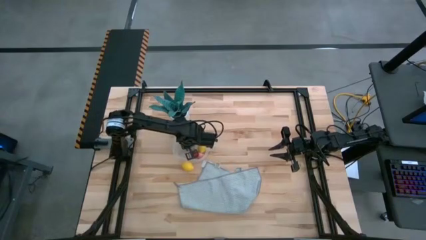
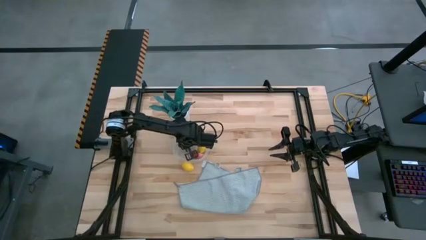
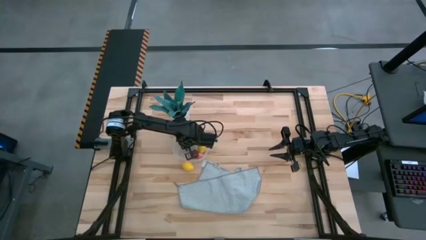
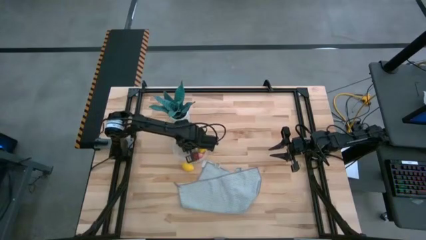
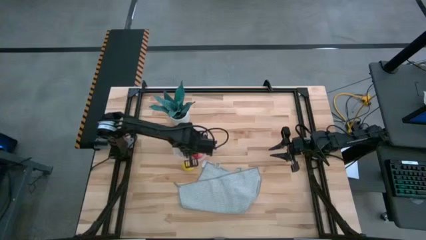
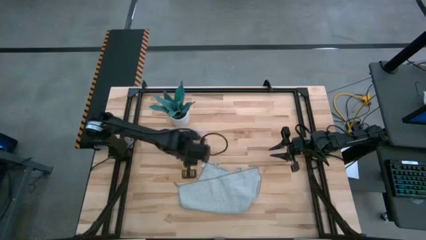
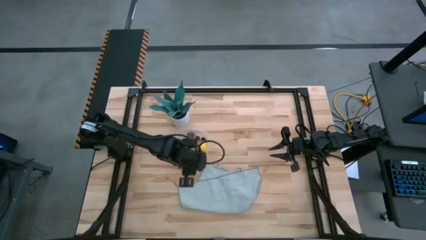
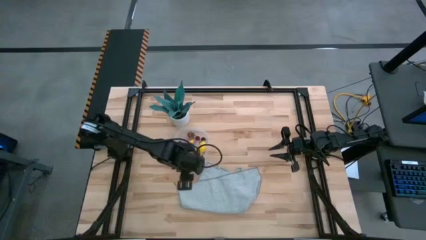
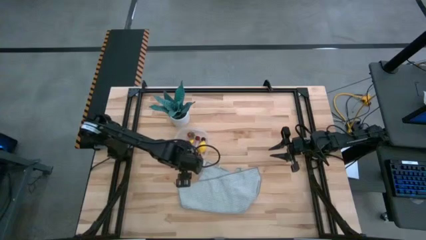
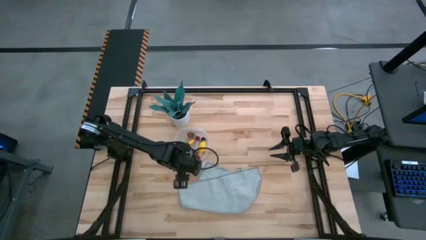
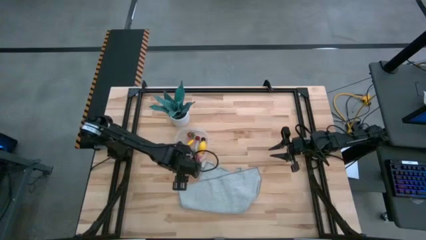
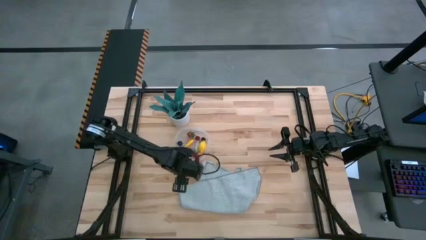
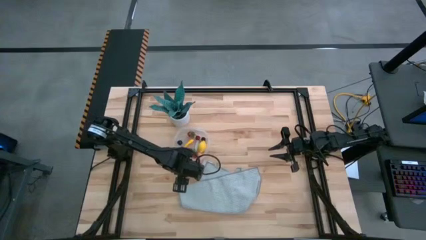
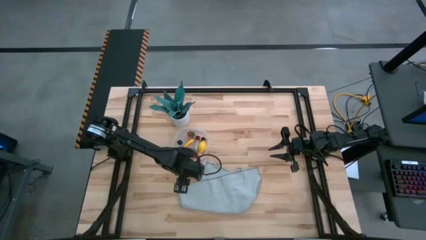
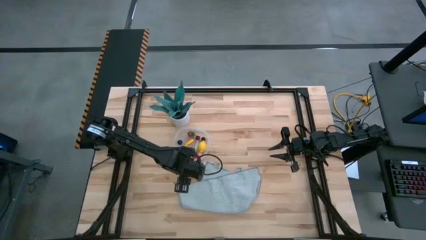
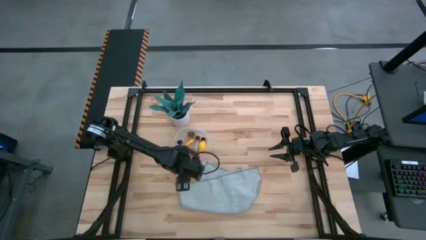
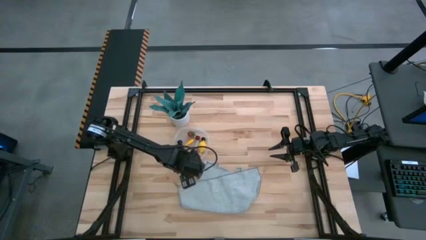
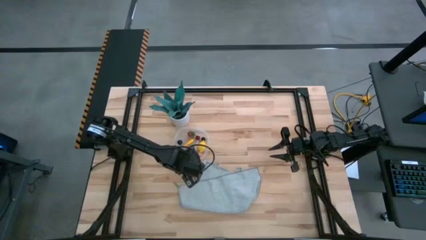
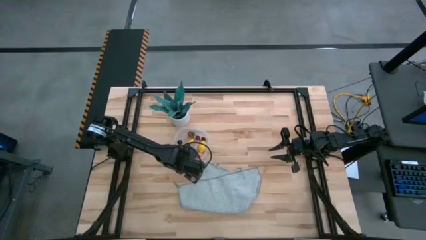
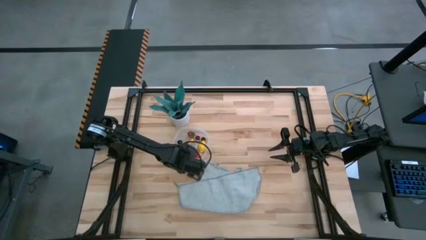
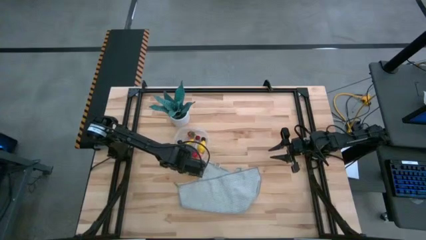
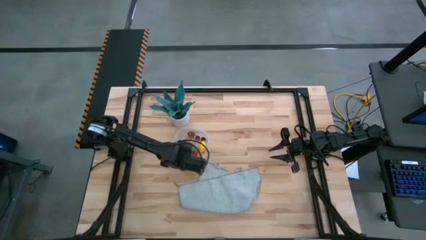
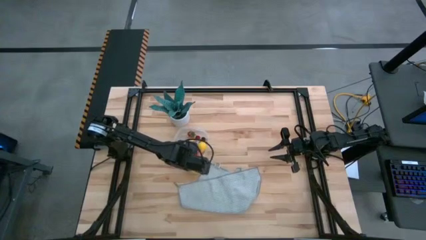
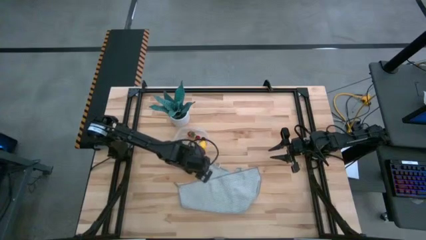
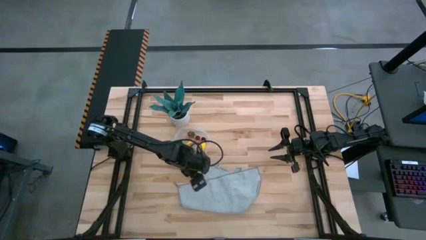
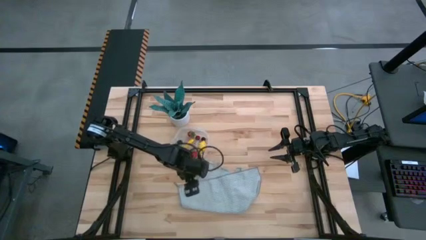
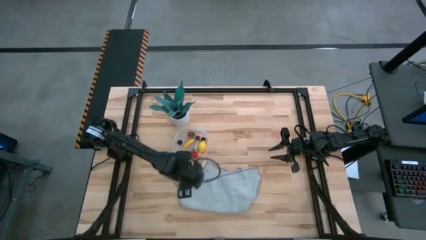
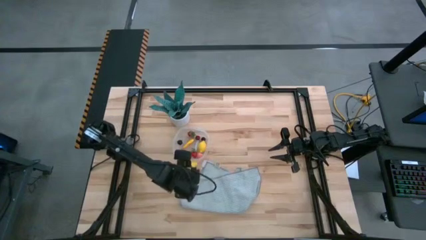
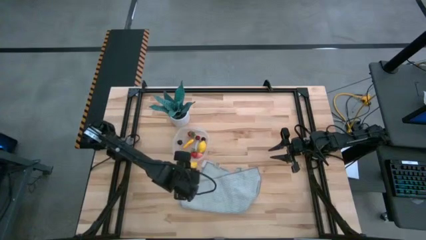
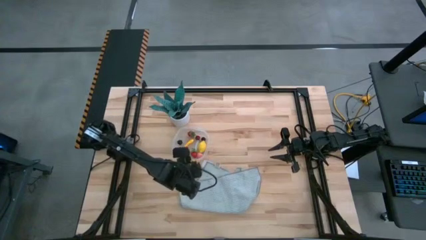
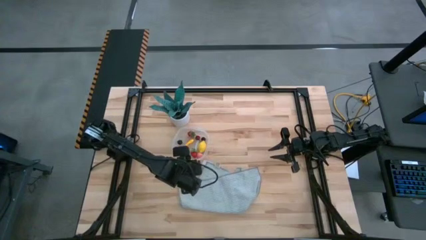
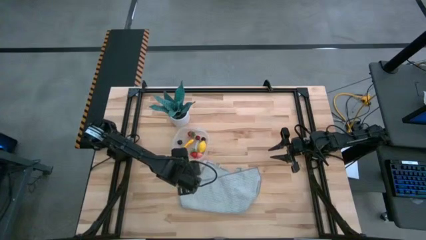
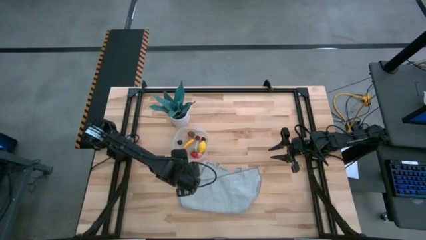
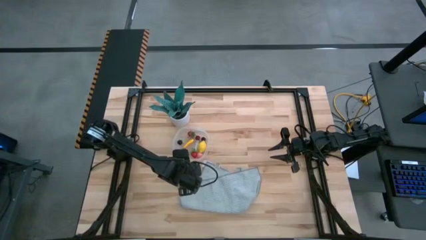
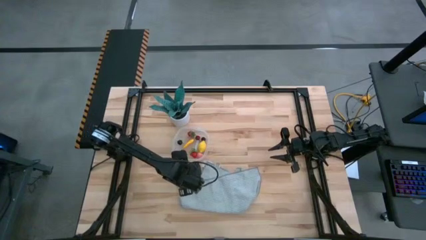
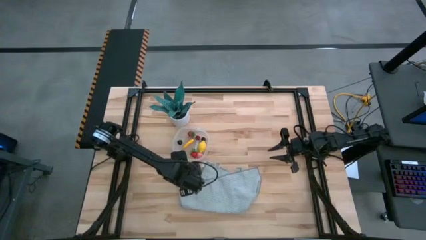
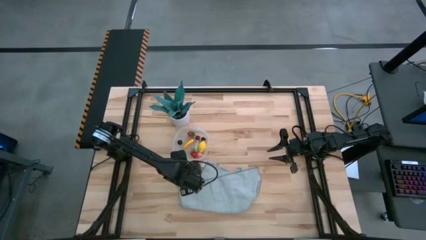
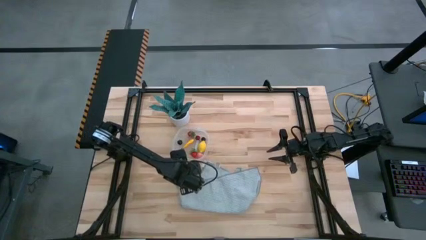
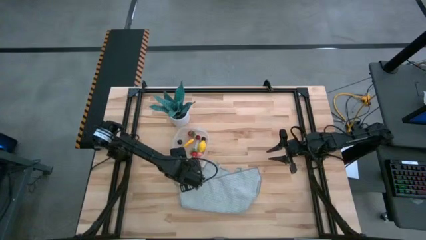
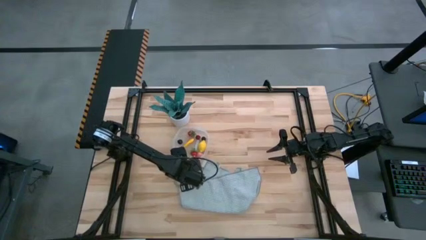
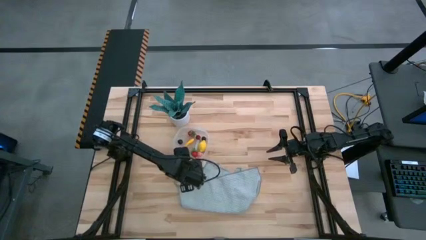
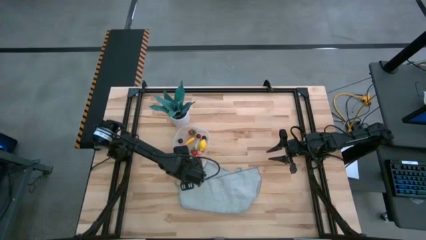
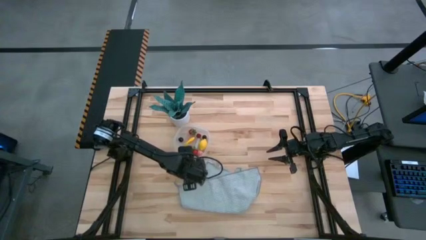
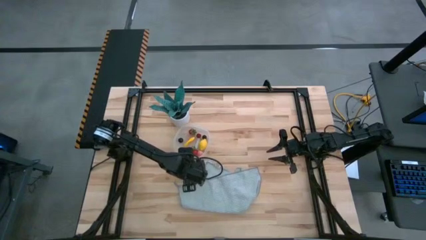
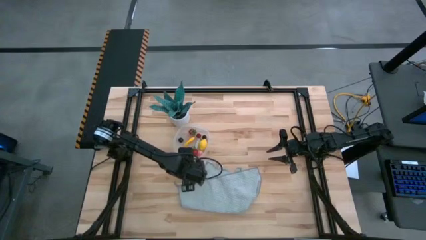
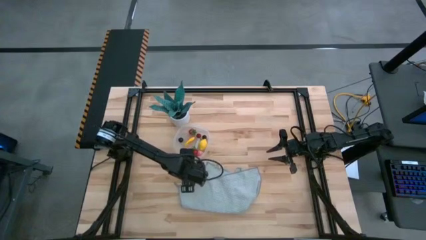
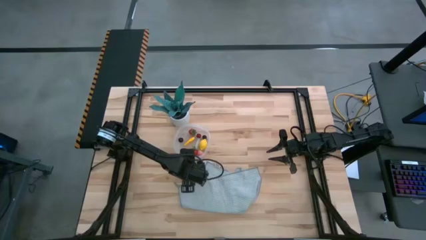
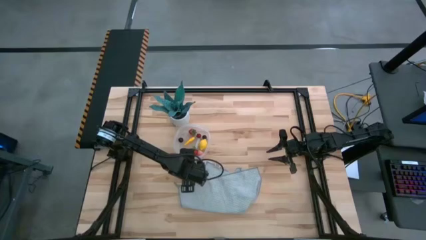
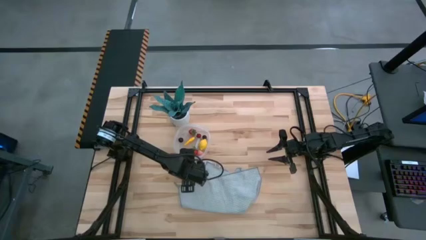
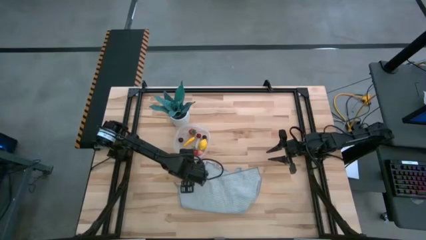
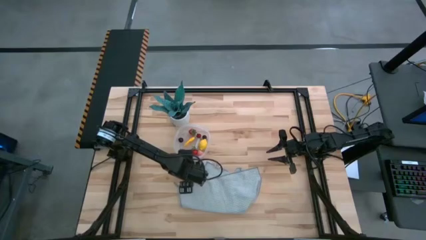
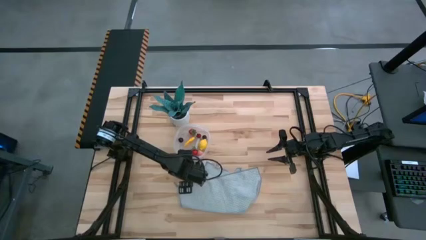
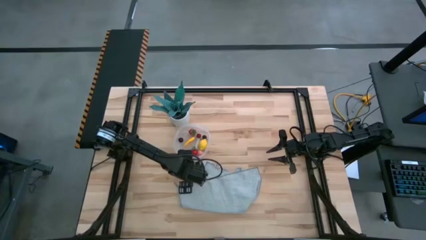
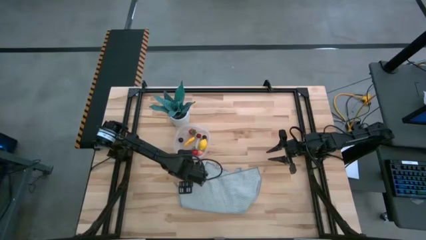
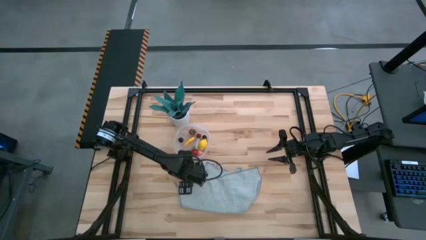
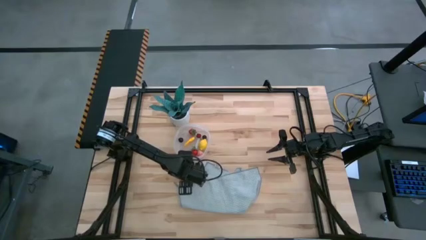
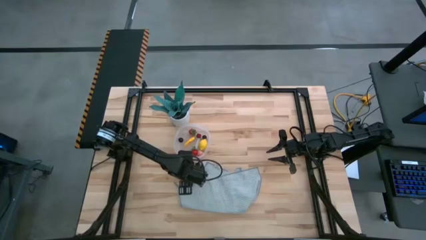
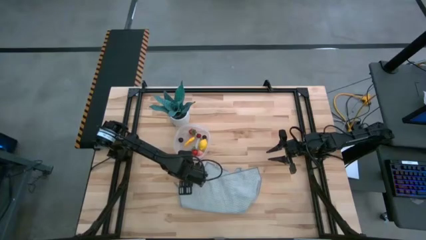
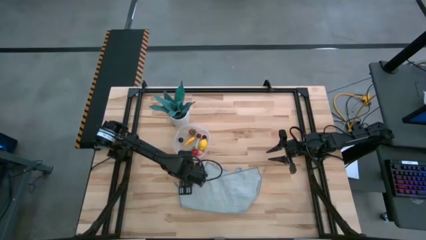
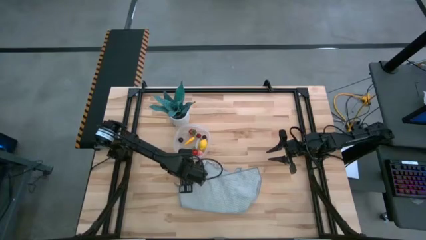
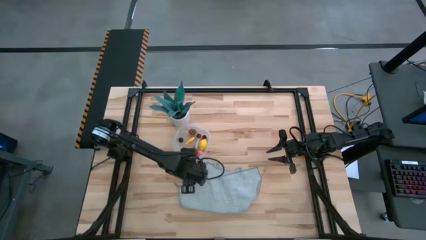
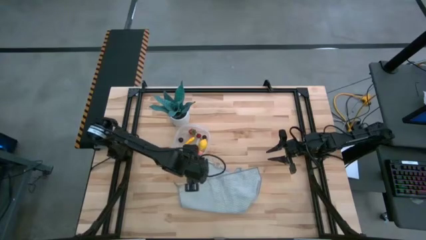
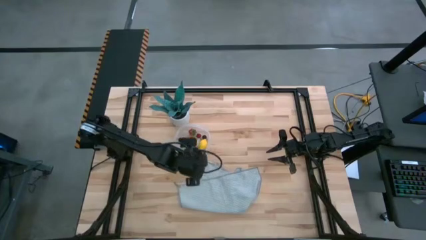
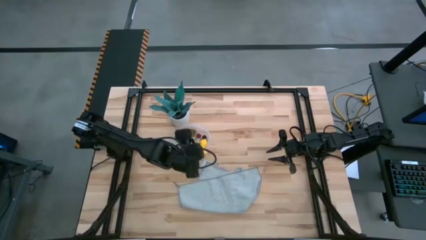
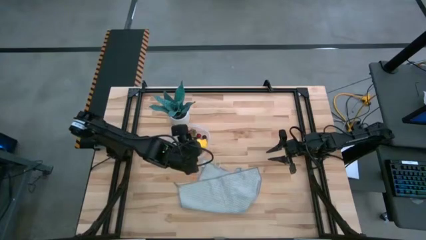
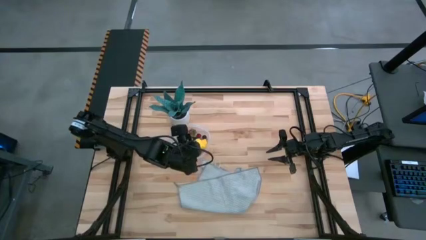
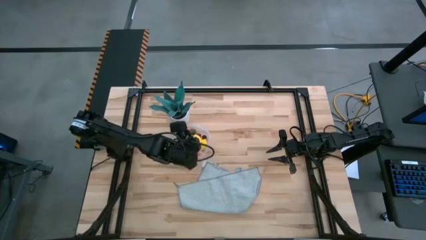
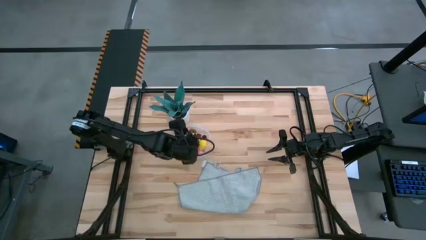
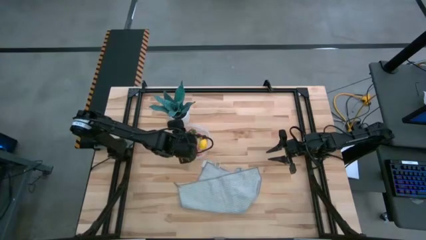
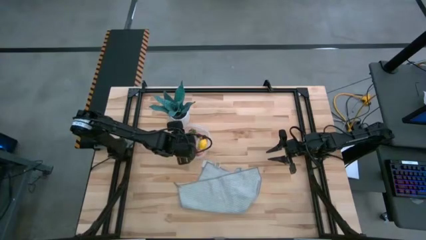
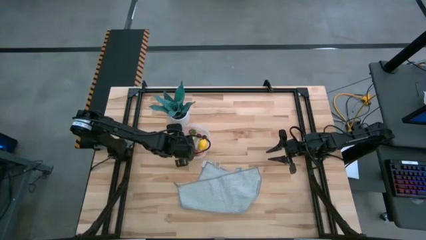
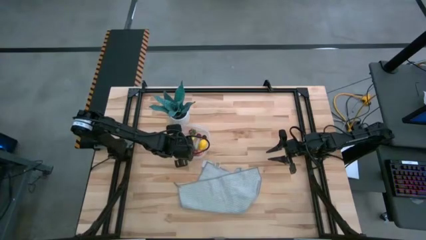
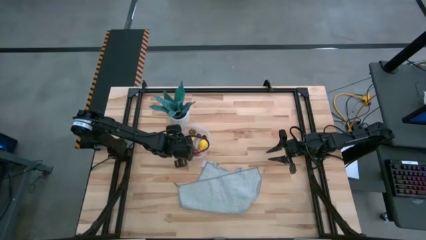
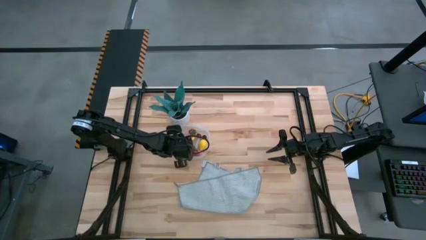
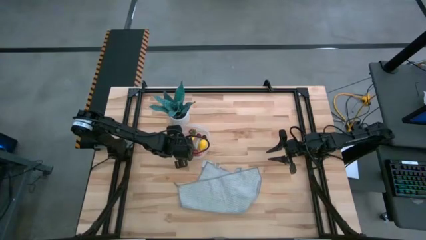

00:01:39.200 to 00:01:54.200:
Task: Pick and placing Produce into tupperware
Put the yellow lemon into the container
